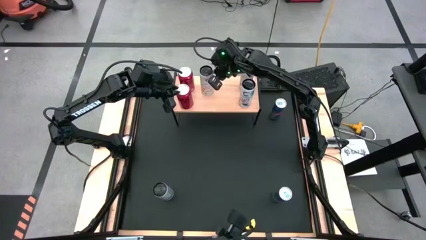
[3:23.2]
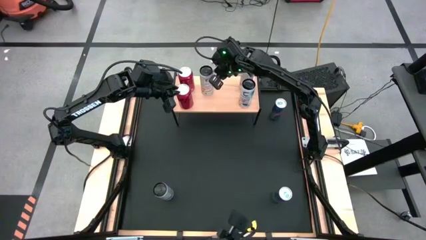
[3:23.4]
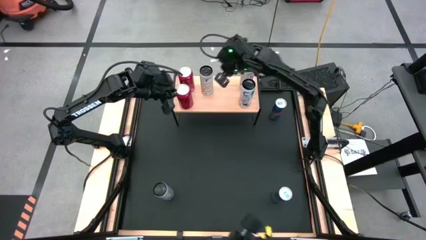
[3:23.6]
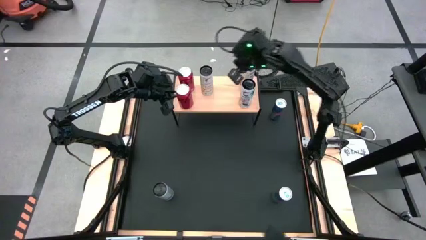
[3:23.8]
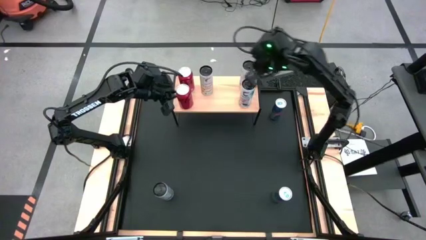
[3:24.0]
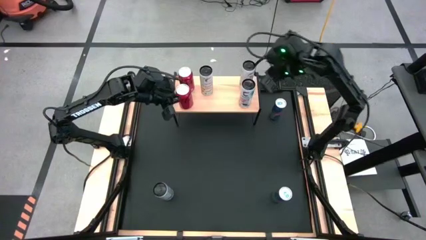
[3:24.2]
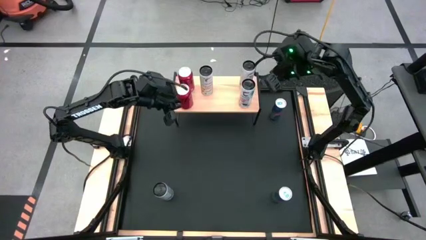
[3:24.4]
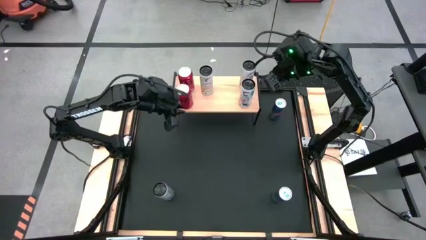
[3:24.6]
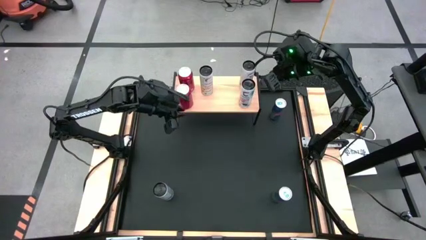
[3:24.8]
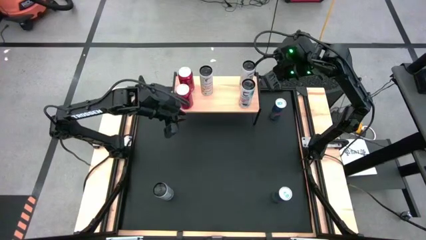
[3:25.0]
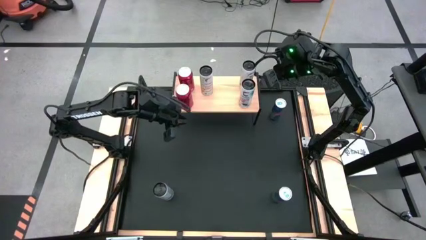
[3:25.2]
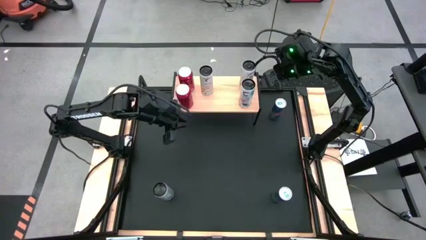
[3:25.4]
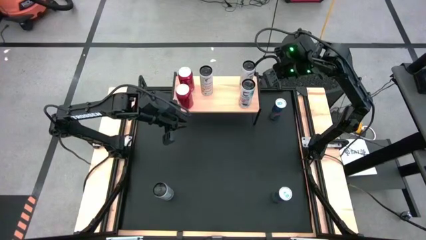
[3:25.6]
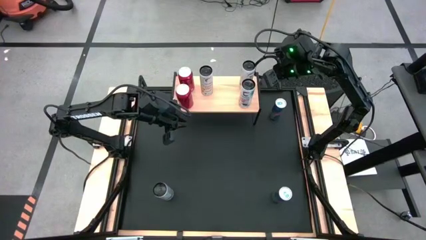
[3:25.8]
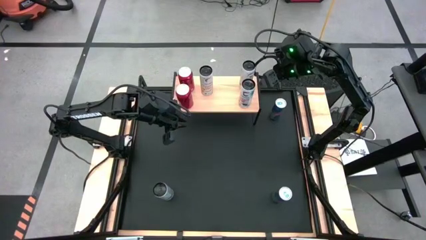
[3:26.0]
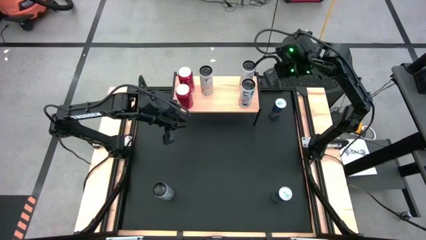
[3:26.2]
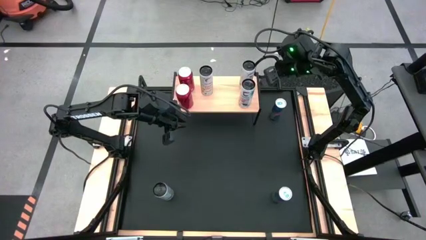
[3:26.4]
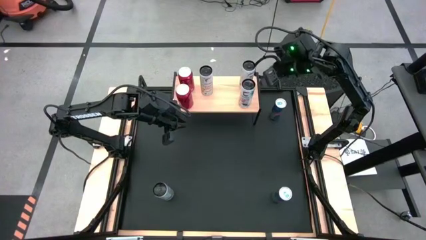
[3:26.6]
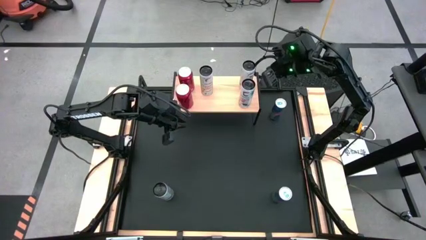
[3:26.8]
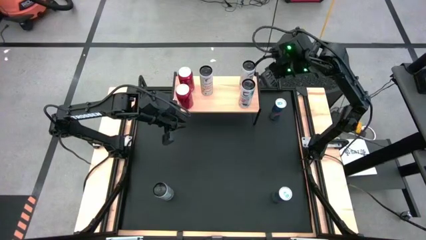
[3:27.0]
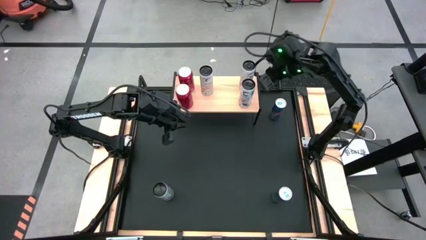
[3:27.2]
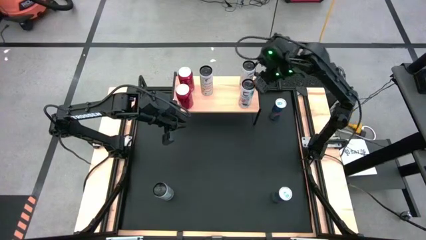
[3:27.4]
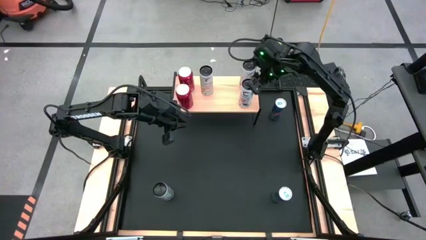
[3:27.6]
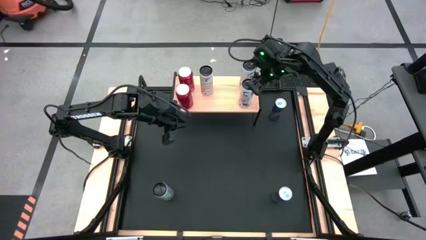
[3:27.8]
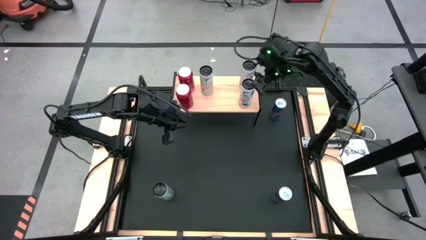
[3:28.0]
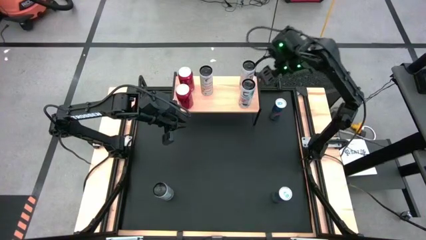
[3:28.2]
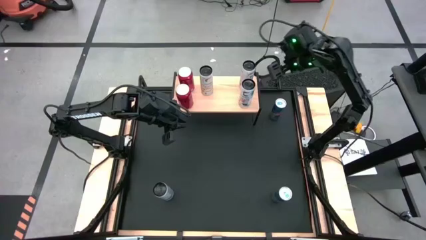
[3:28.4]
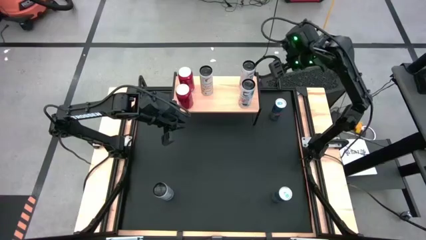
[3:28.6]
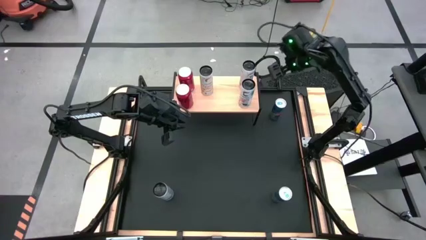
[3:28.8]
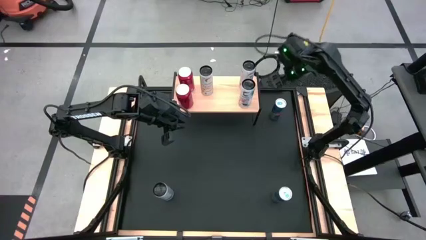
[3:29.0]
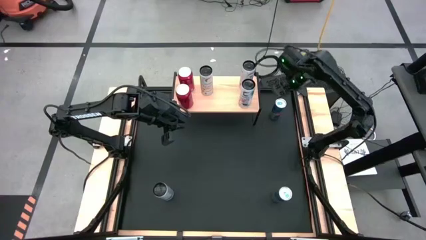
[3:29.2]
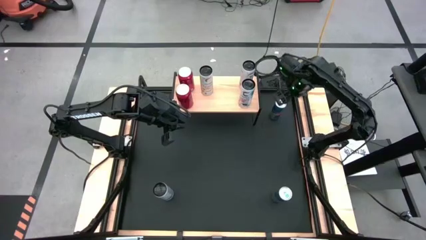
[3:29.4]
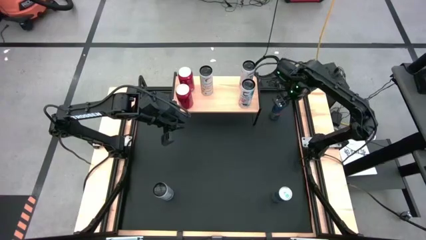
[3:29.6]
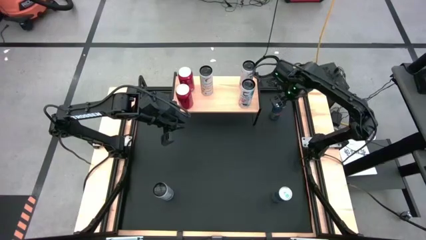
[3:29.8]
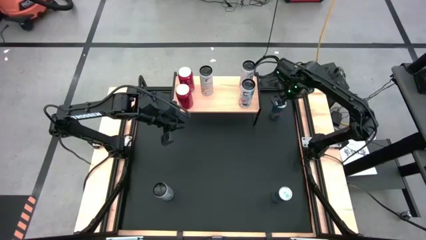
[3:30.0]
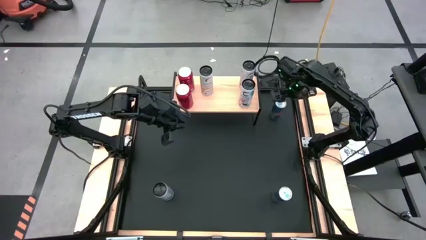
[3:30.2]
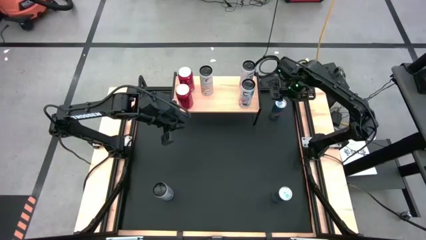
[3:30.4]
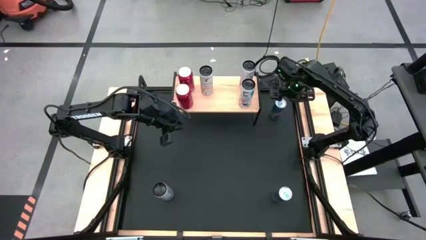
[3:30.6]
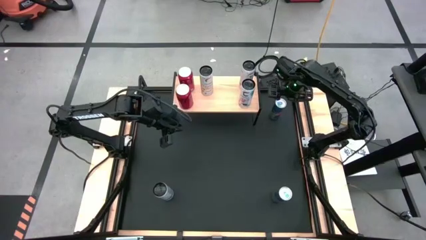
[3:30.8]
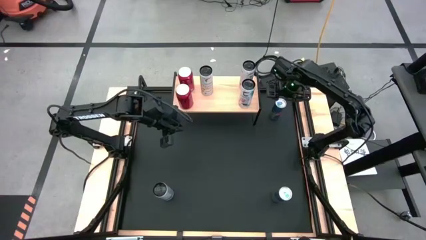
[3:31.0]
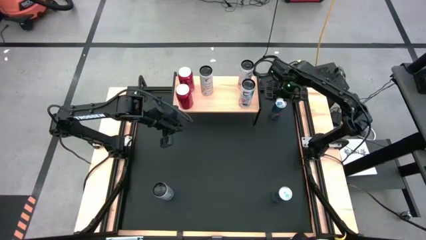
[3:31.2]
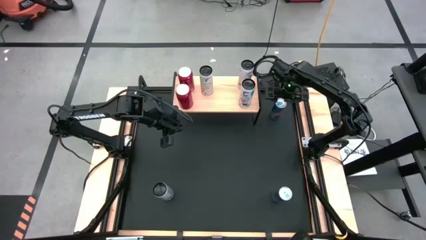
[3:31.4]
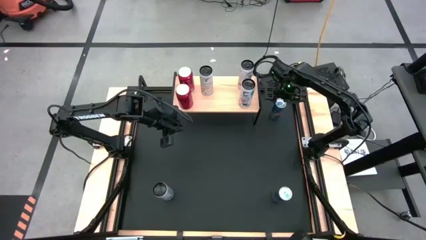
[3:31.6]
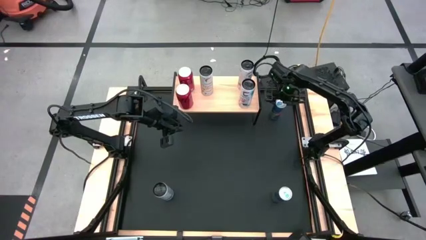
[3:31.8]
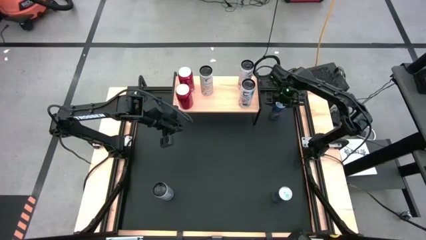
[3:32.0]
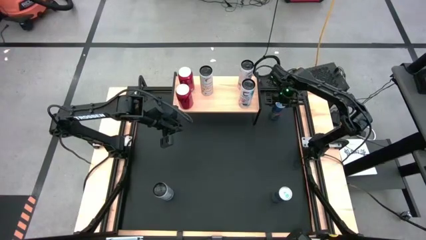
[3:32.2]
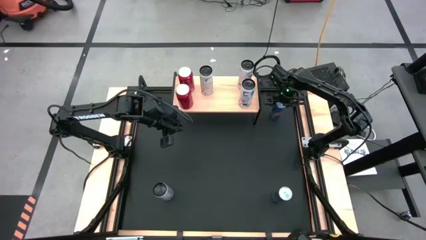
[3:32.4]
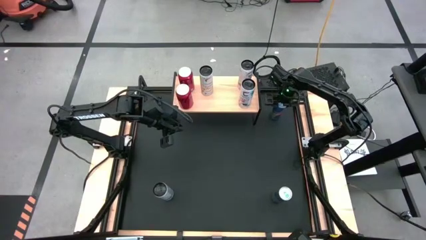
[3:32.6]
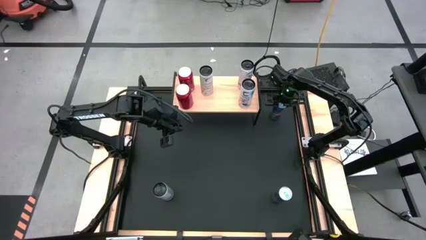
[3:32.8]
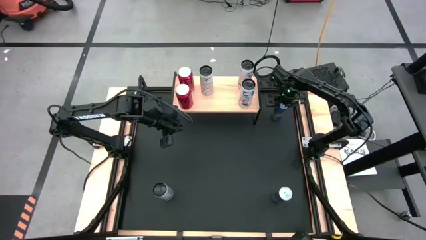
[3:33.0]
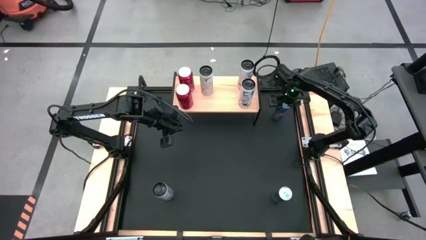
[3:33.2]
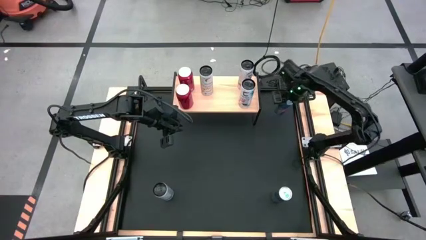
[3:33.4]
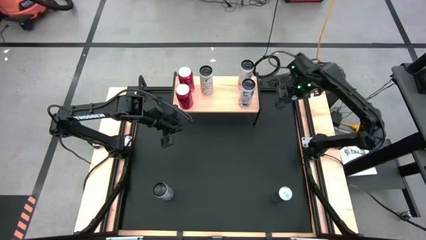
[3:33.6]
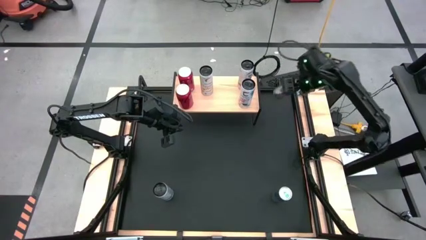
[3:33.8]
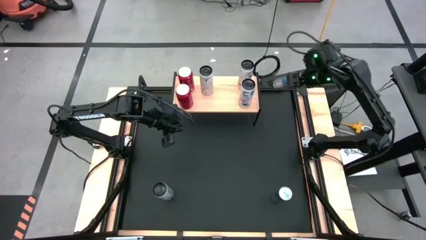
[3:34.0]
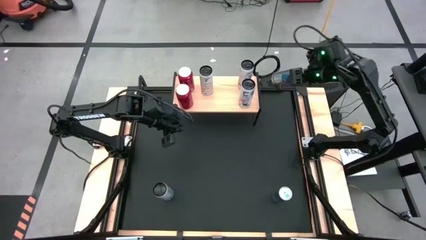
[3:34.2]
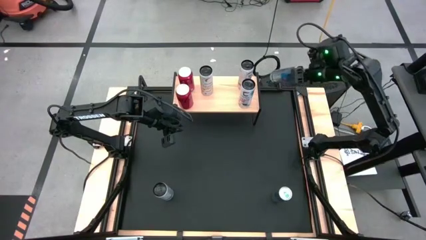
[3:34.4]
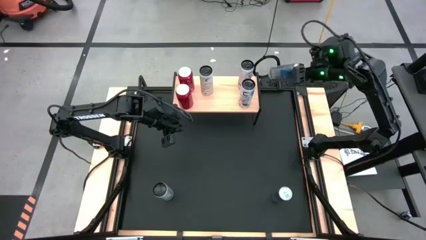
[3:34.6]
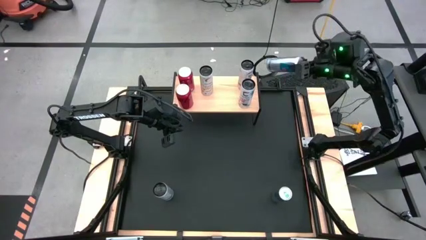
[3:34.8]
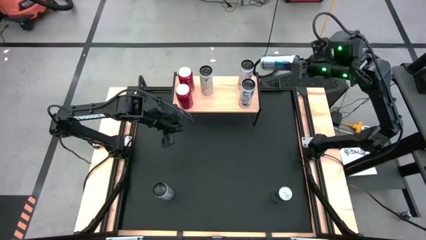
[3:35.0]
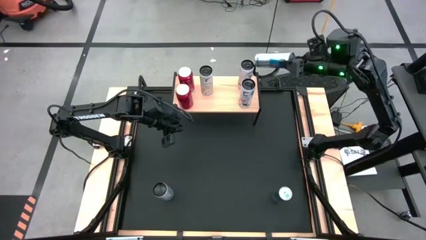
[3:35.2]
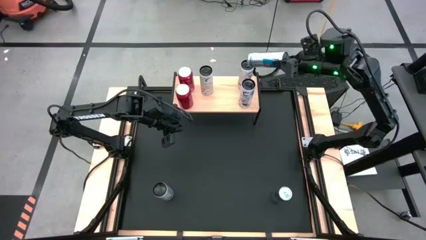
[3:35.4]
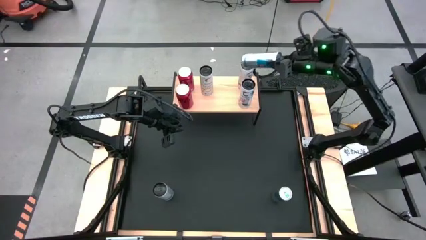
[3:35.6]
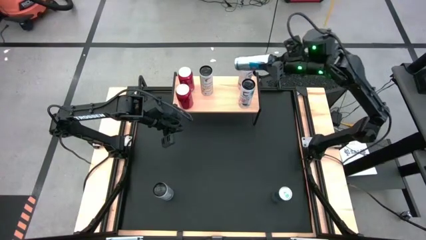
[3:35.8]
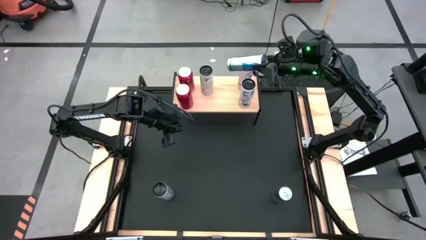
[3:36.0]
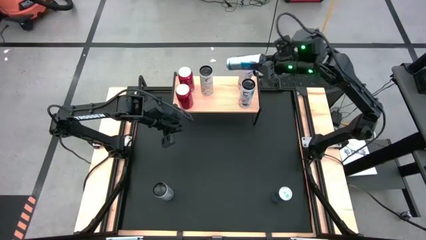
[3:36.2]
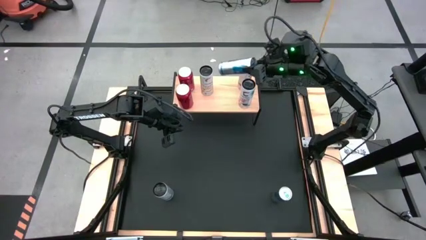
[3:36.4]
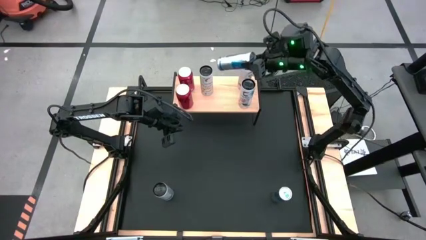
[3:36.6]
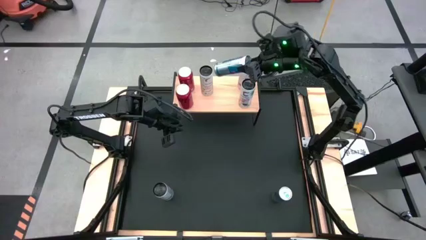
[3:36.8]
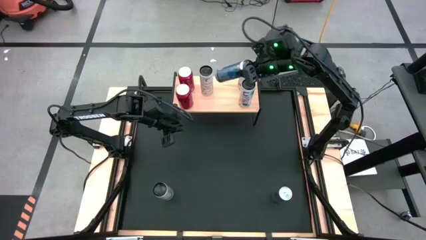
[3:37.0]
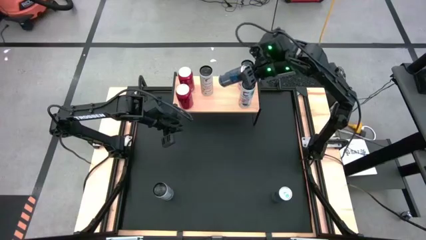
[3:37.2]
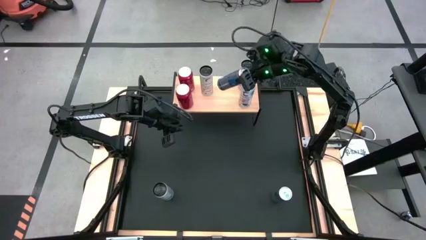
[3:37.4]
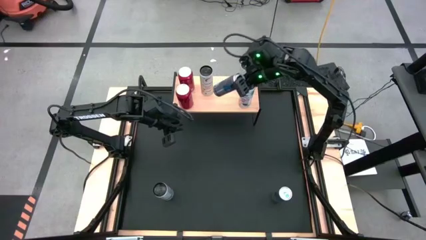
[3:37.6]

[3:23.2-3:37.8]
Task: Place canned beverage on shelf
Put the top blue soda can on the shelf

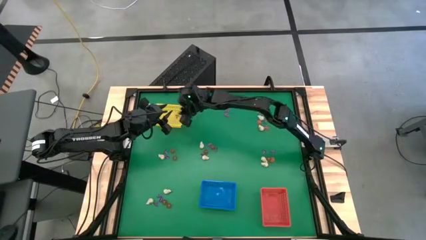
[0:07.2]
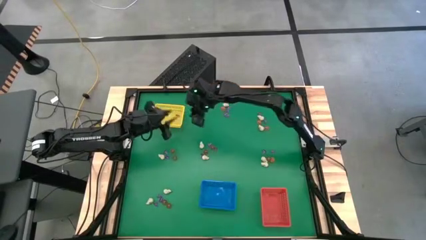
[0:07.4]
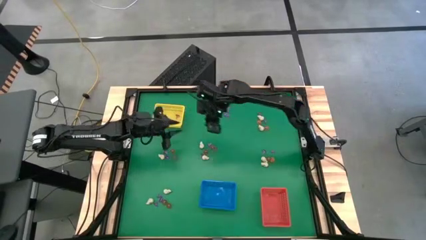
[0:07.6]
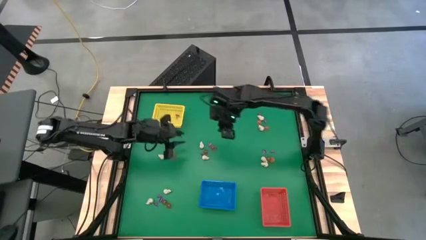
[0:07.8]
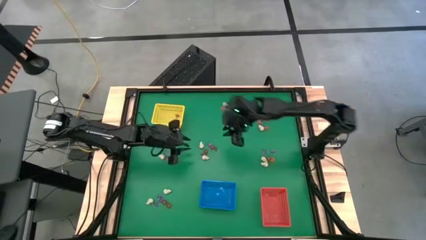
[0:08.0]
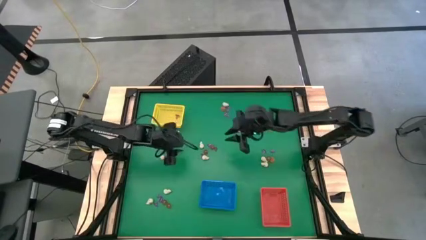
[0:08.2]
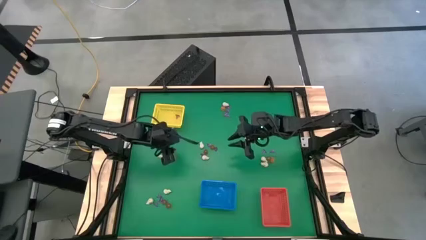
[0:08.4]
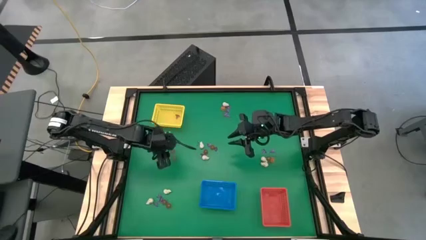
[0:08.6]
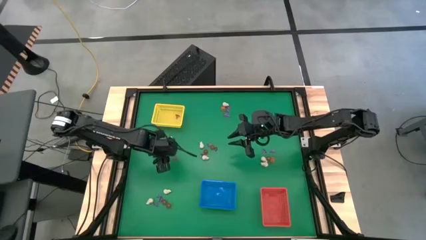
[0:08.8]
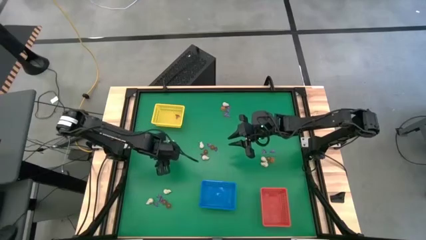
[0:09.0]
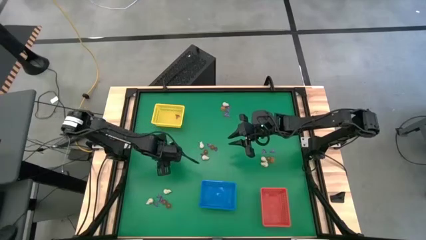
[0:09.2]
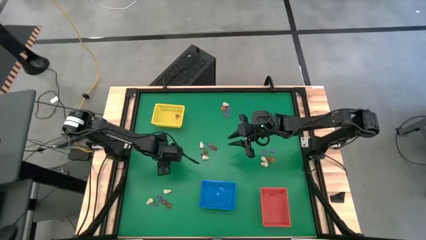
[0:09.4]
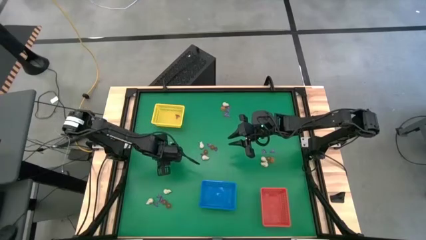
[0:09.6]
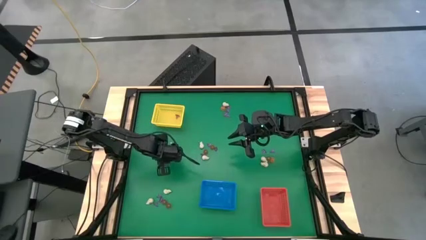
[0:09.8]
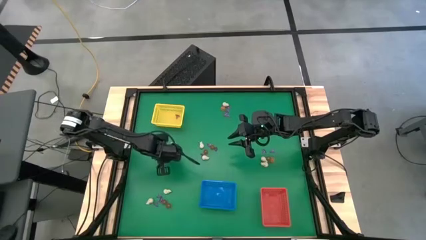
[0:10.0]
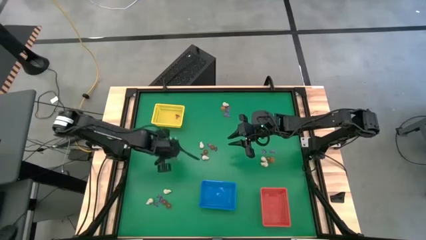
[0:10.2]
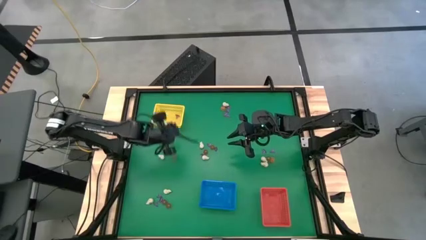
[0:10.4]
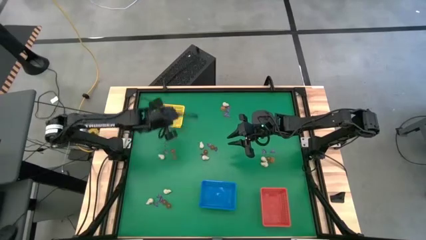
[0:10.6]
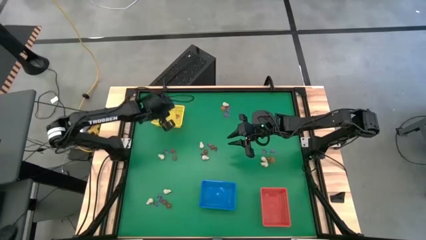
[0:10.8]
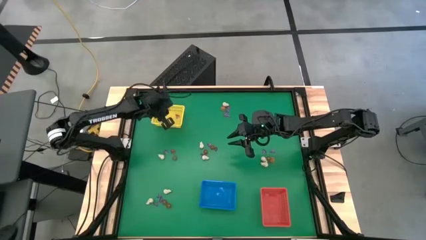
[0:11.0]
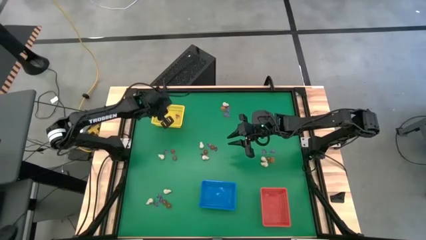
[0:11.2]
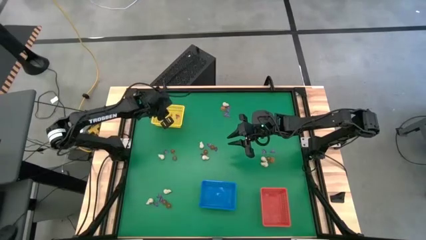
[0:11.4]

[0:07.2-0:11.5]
Task: Sort Halloween decoration
Put the purple witch hat toy into the yellow basket
